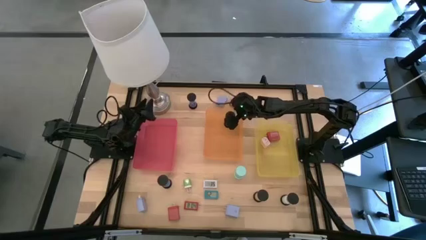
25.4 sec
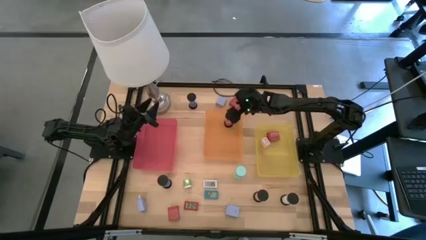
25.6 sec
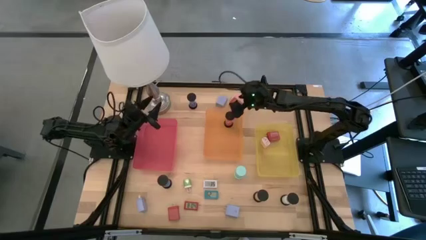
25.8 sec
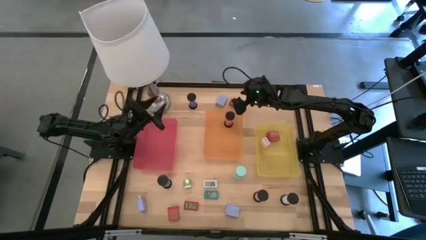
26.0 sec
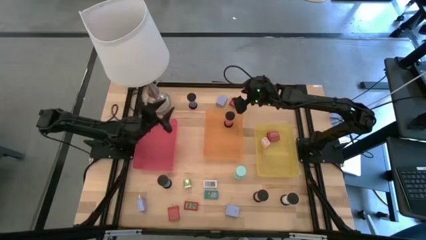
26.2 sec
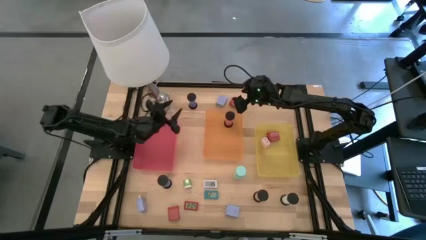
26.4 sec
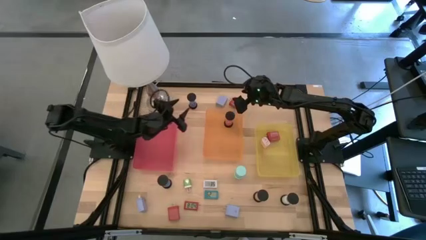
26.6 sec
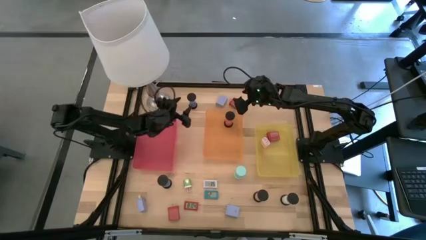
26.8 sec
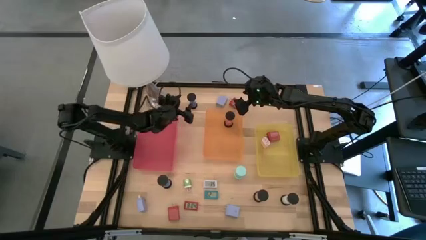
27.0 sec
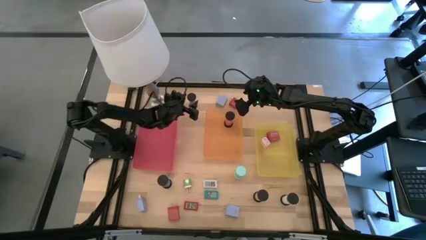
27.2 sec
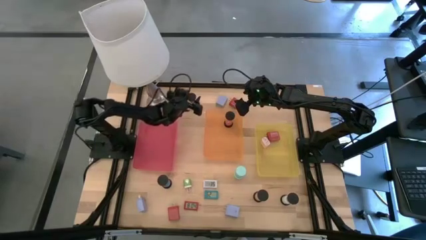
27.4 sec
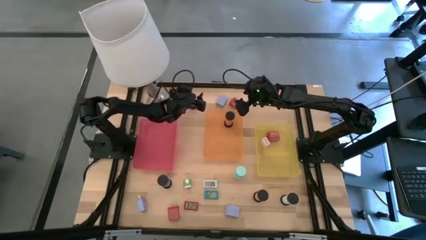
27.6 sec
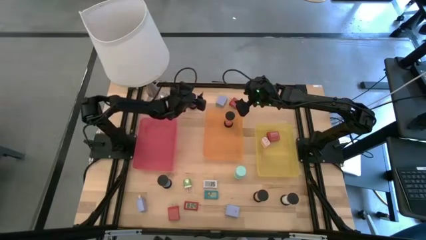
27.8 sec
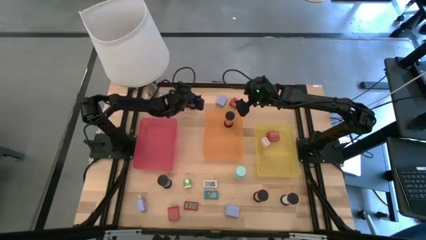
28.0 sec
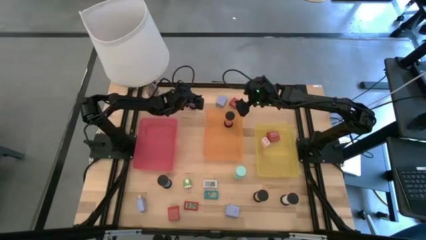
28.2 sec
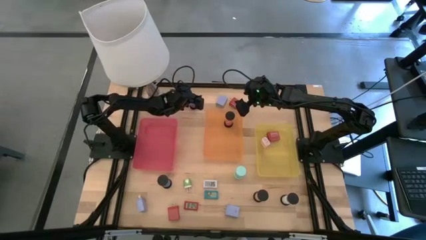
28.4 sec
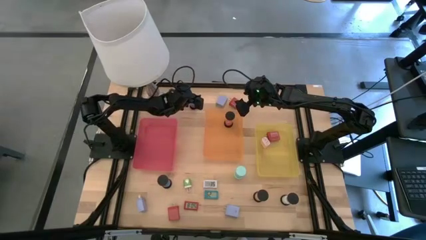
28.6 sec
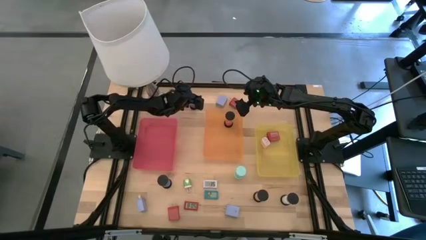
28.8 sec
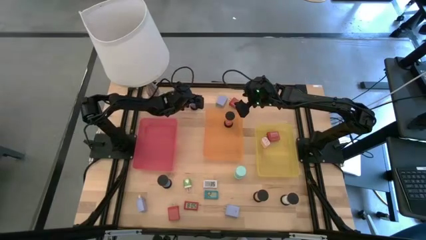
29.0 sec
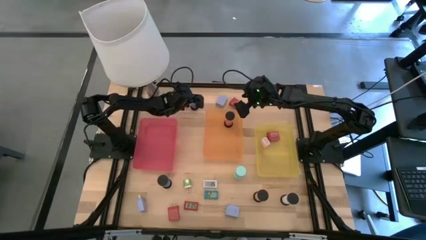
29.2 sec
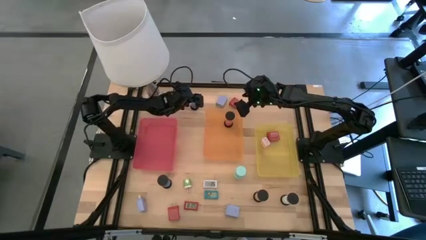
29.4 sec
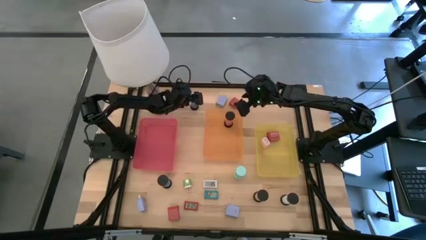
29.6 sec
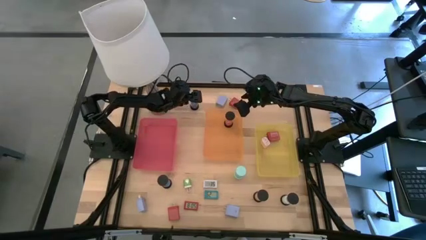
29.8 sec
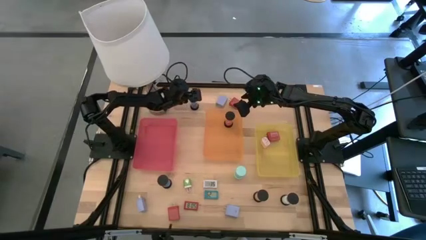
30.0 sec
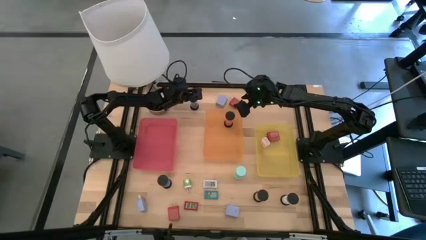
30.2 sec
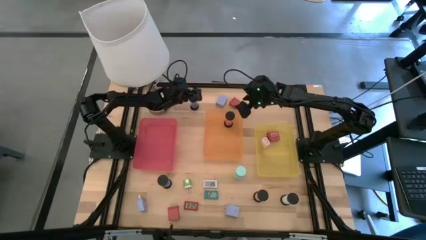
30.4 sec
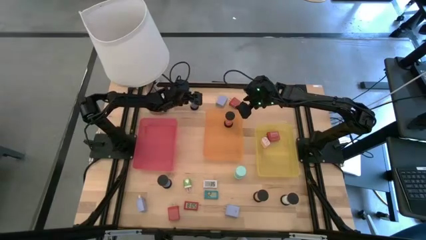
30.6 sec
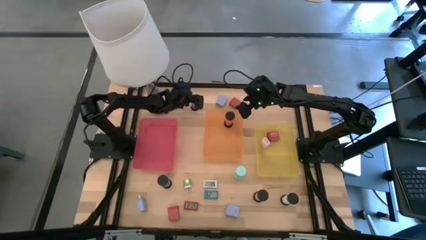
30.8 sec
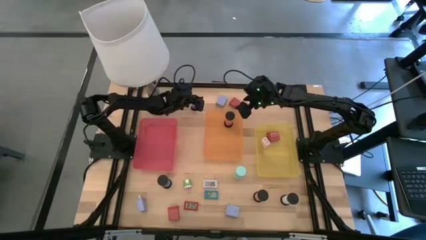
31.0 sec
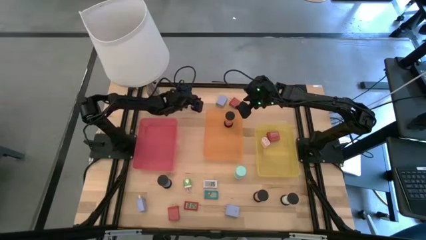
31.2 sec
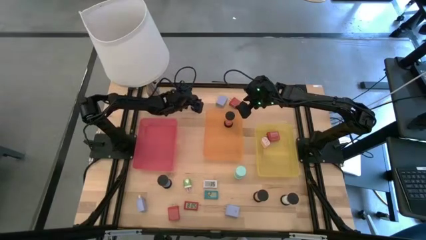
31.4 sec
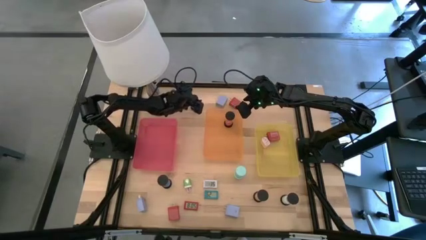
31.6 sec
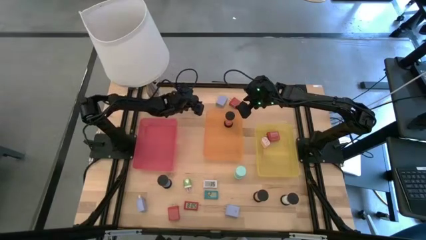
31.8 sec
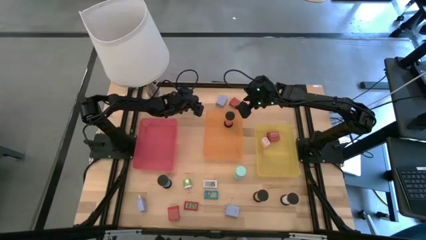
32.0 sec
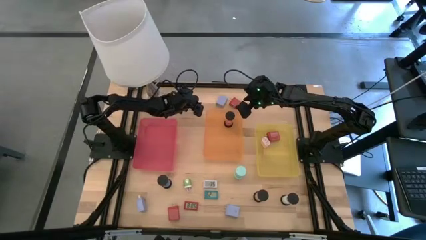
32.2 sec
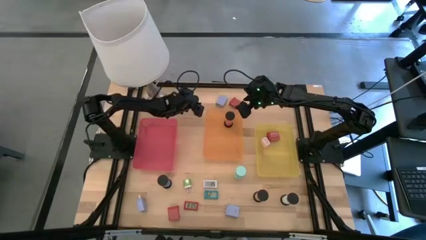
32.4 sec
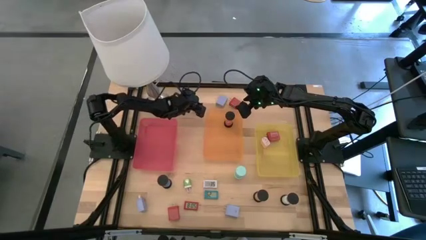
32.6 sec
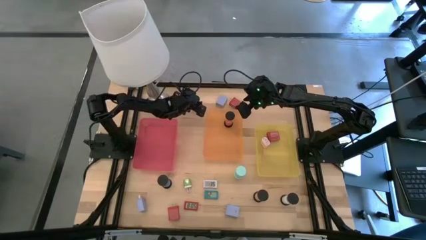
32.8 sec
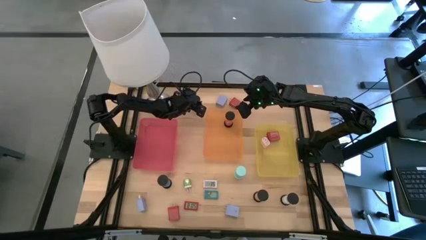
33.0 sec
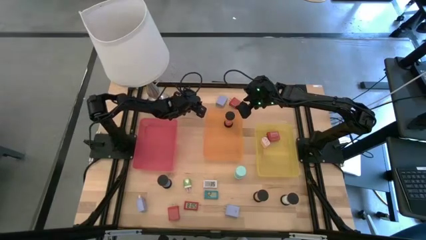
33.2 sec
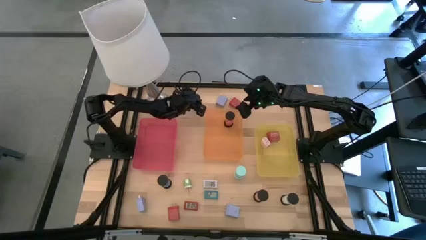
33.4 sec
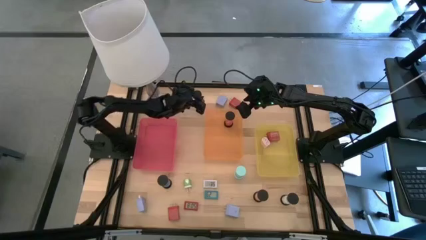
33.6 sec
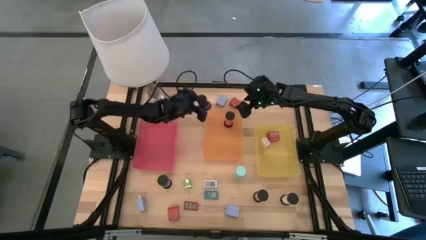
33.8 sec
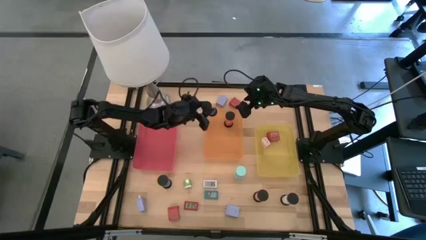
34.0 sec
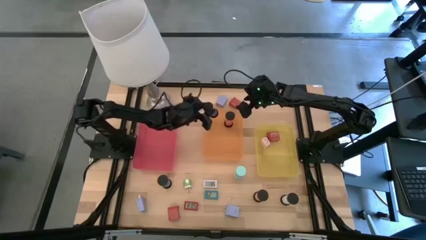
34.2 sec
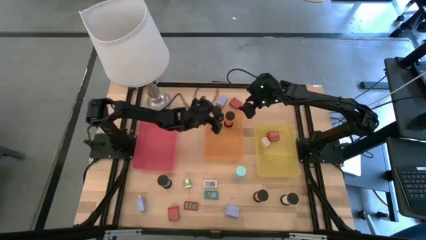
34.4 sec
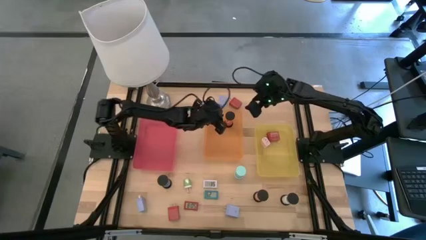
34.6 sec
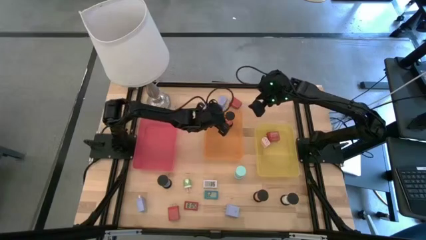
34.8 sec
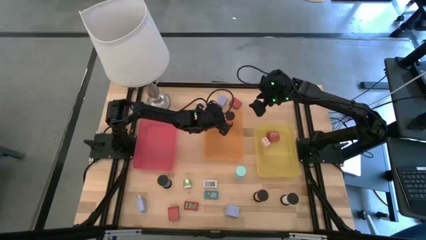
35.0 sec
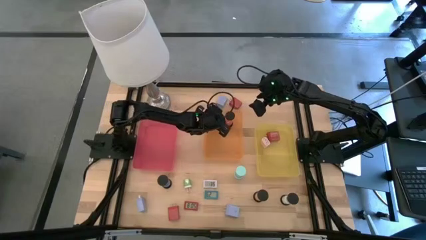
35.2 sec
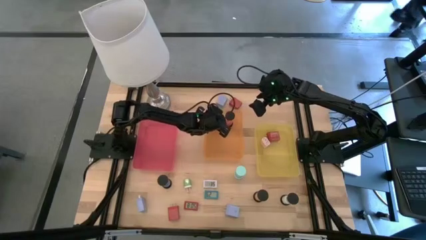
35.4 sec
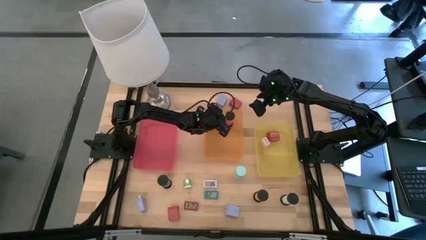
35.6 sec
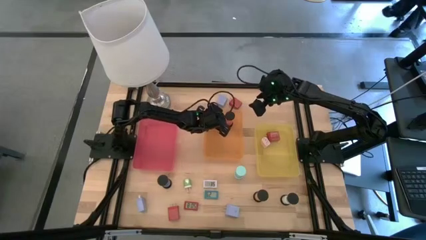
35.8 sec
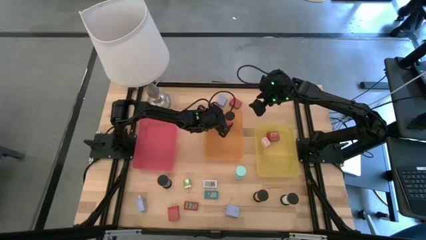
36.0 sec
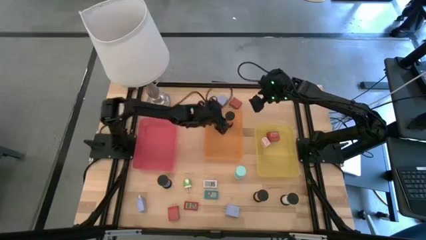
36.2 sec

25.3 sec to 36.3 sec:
Task: Pick & Place Office items
Put the top blue hourglass into the orange bin

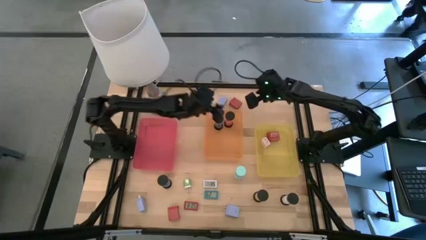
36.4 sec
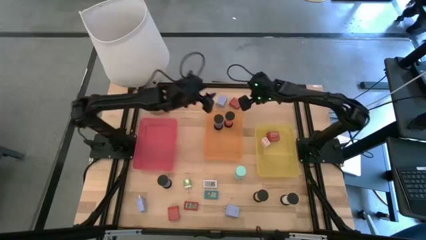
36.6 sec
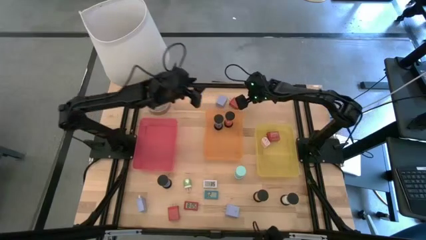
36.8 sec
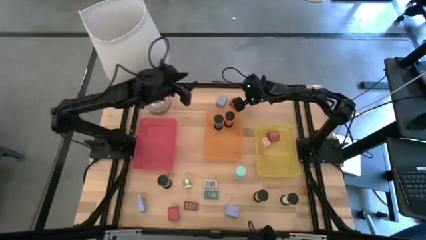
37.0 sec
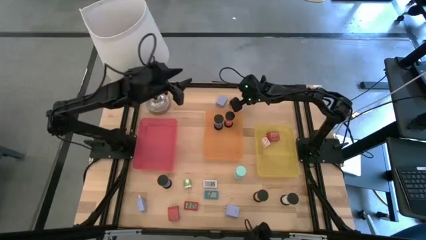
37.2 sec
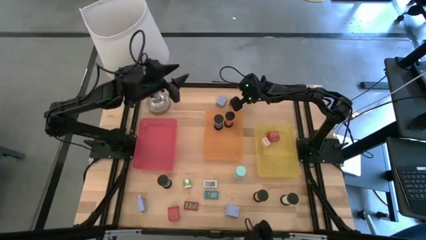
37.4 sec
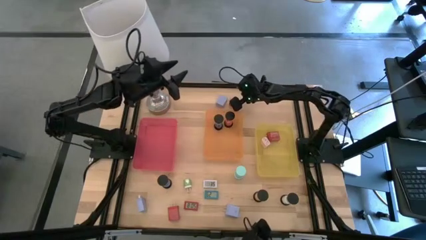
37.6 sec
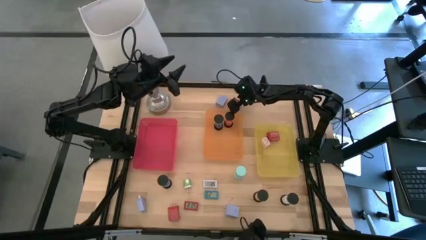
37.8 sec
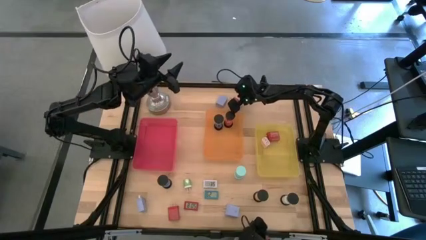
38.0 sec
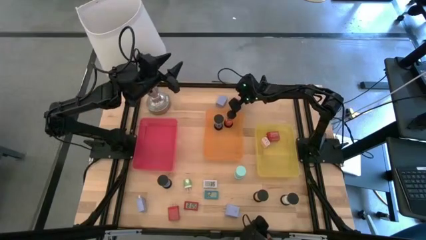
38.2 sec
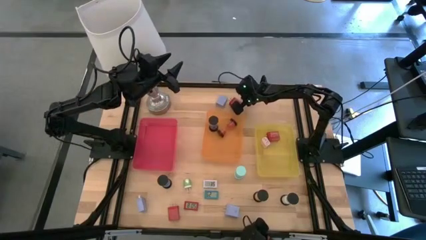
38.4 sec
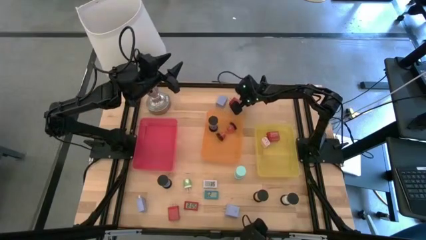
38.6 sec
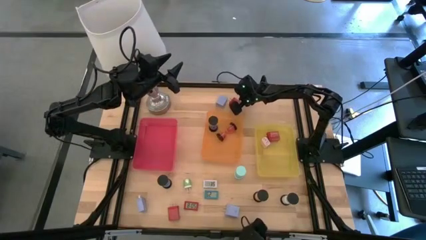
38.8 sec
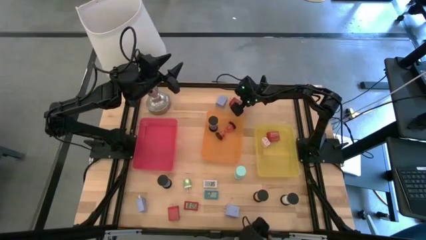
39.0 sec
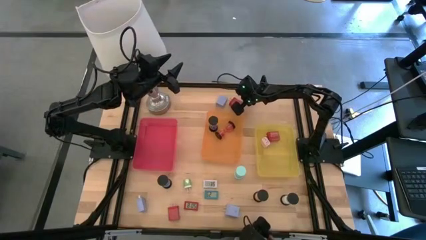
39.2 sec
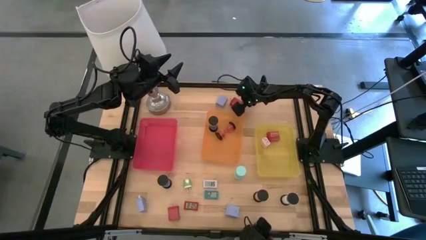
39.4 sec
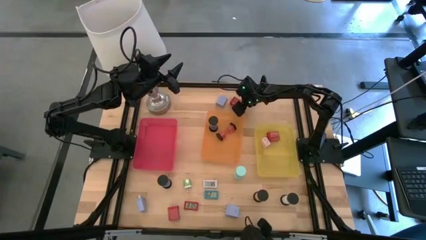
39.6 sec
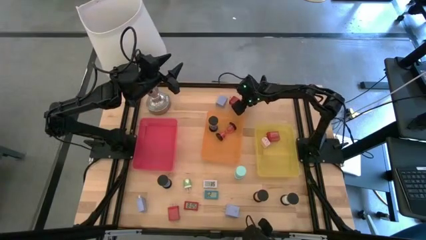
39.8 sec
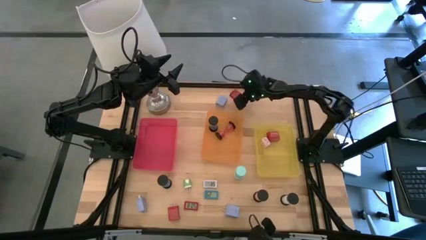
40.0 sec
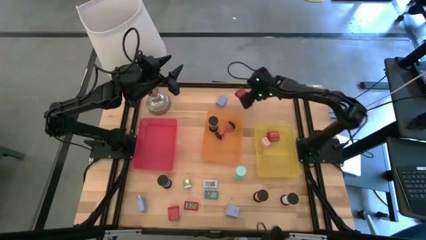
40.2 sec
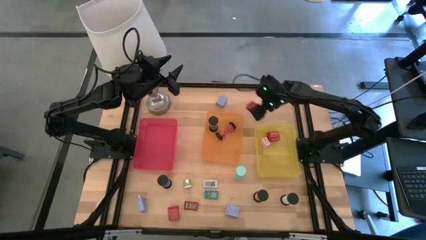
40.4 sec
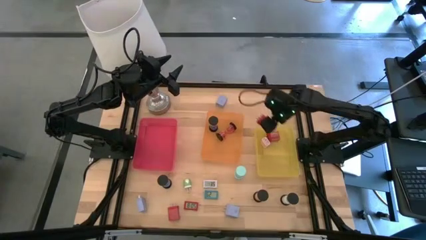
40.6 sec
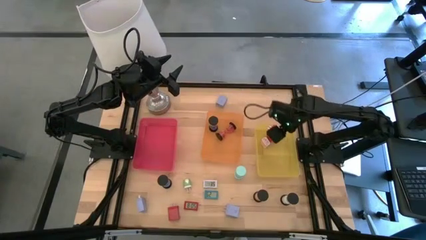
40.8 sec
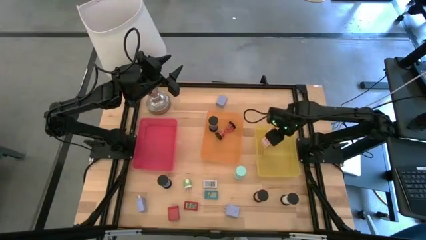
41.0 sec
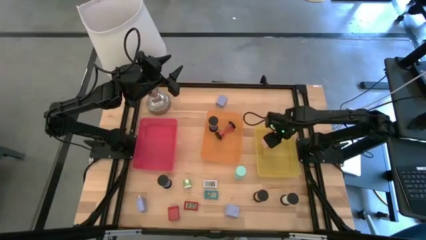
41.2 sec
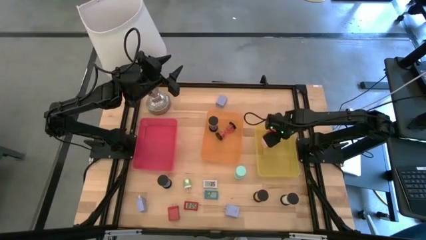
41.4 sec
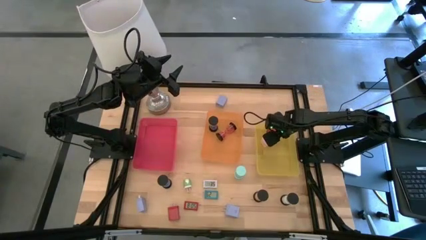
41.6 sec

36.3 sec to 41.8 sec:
Put the top red charger adapter into the yellow bin
